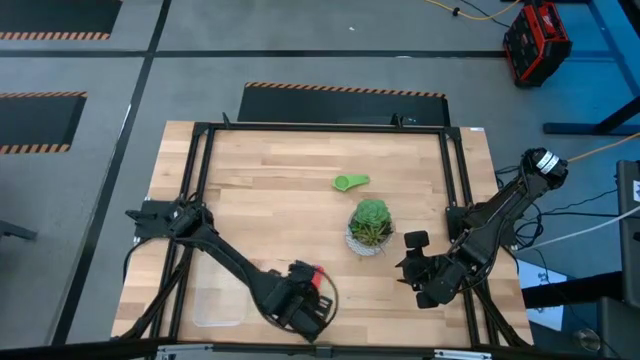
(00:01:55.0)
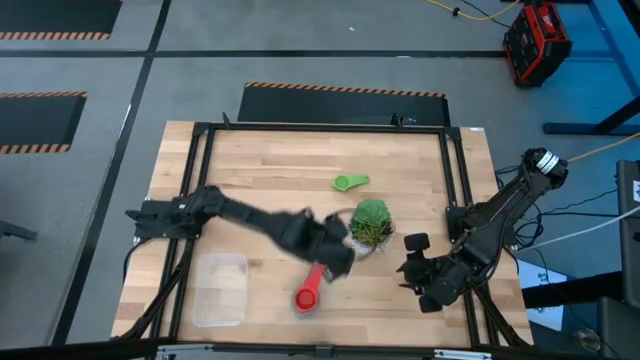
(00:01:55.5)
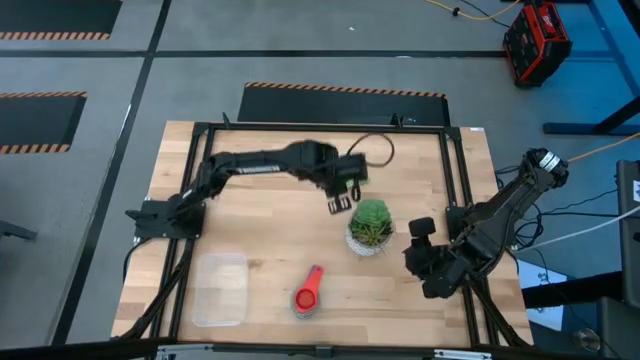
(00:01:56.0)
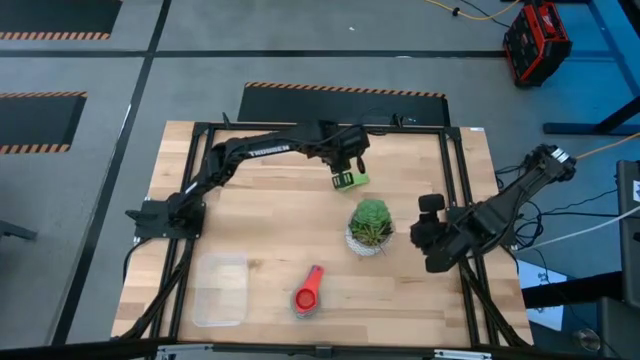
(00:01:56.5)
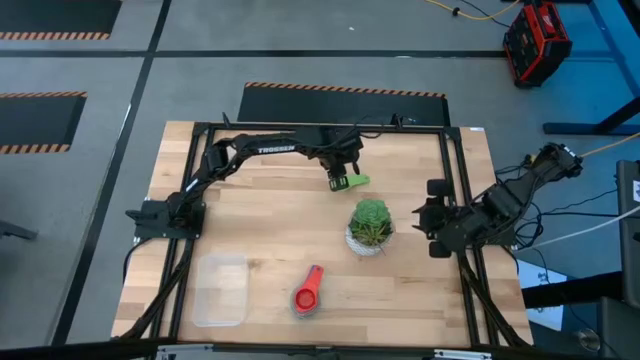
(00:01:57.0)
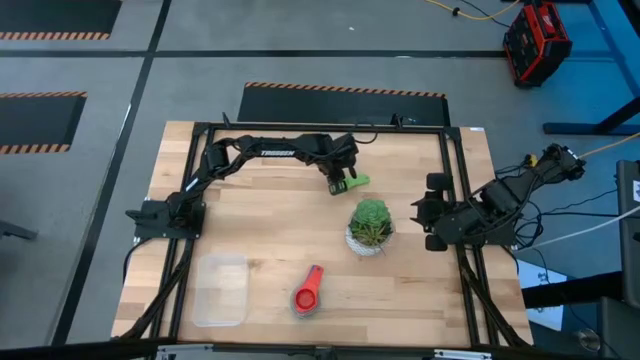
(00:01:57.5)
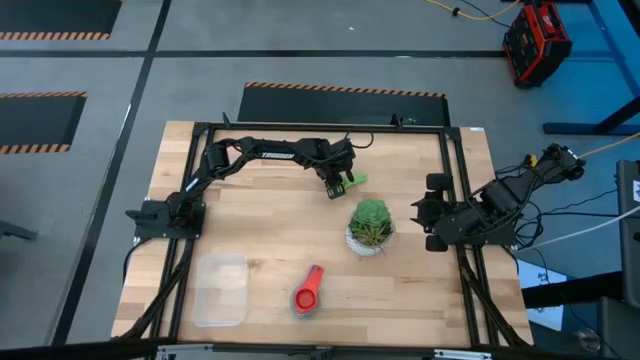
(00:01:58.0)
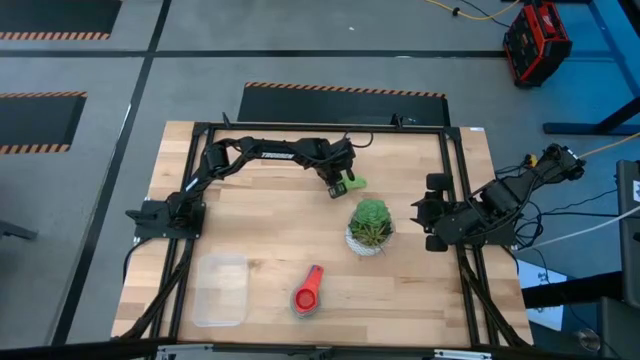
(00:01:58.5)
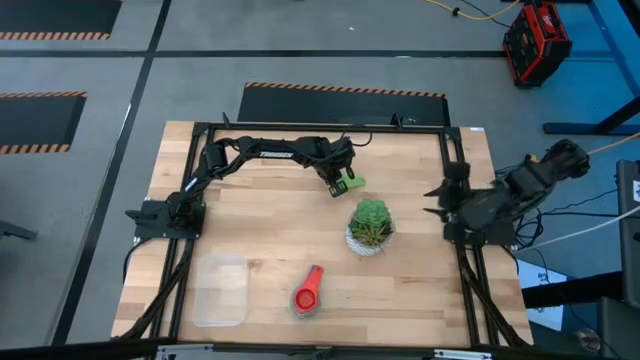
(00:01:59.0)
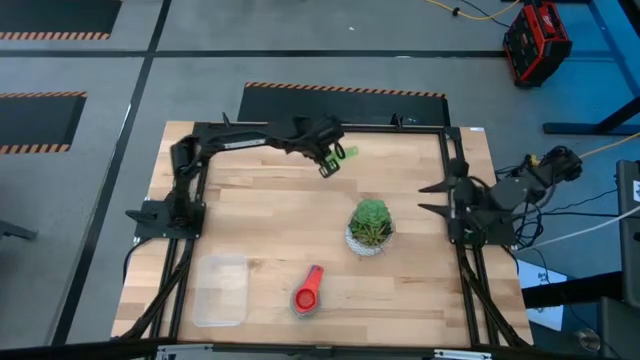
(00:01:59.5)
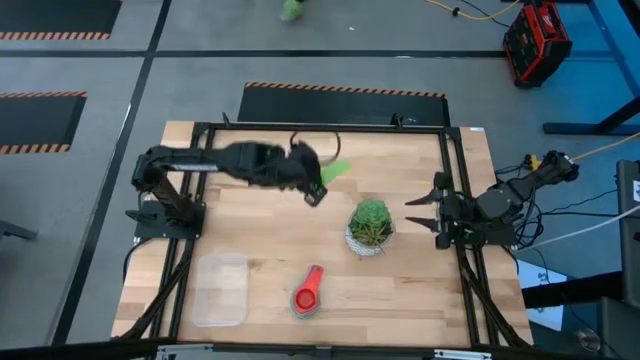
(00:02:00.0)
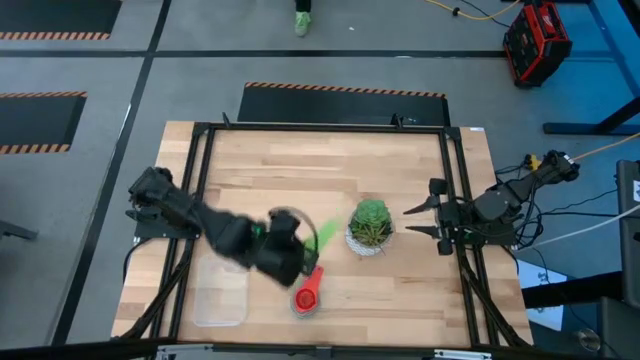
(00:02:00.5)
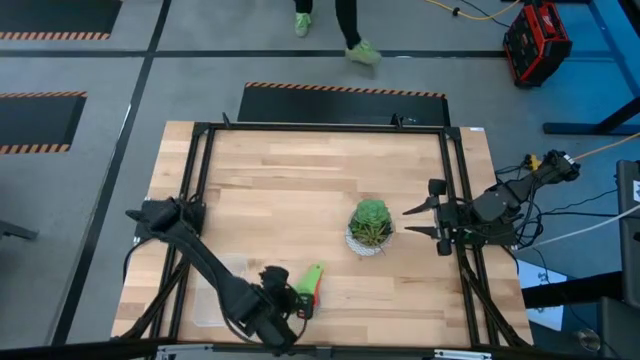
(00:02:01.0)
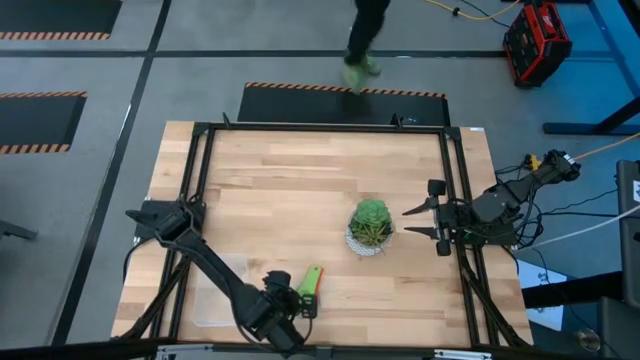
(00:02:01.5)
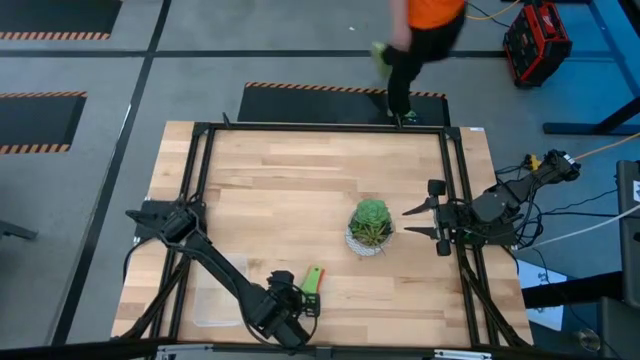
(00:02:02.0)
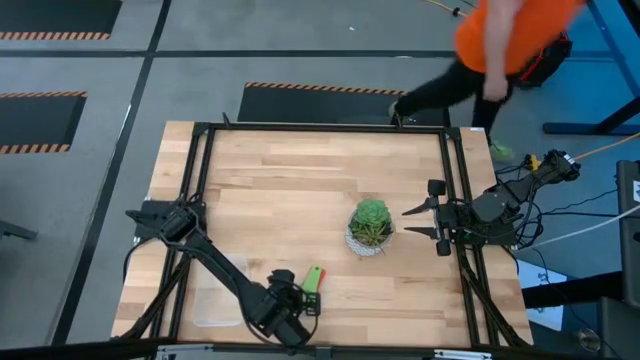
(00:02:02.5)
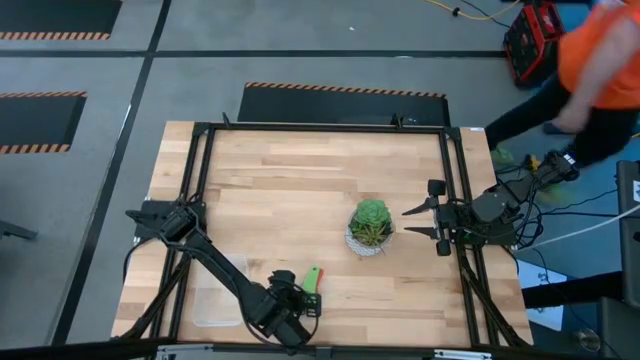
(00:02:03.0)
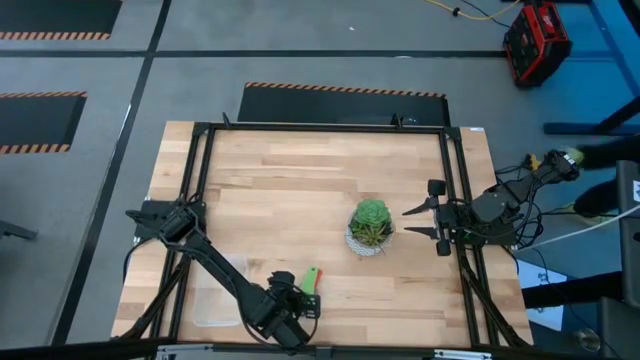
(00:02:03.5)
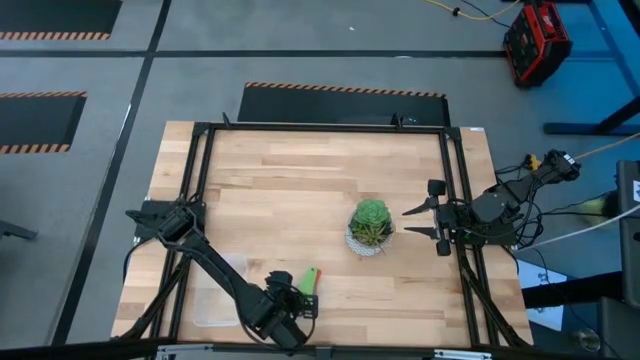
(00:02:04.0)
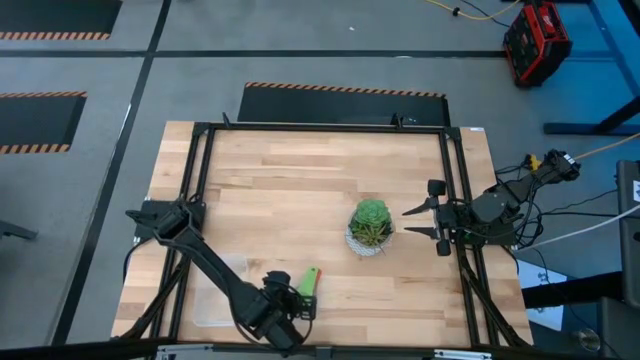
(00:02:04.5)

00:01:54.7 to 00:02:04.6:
Task: Nest measuring cups in basket
Stack the green measuring cup on top of the red measuring cup

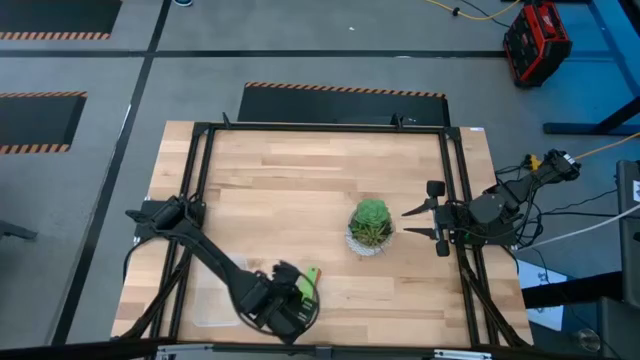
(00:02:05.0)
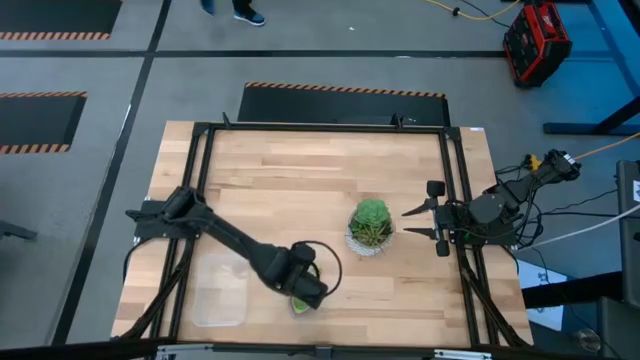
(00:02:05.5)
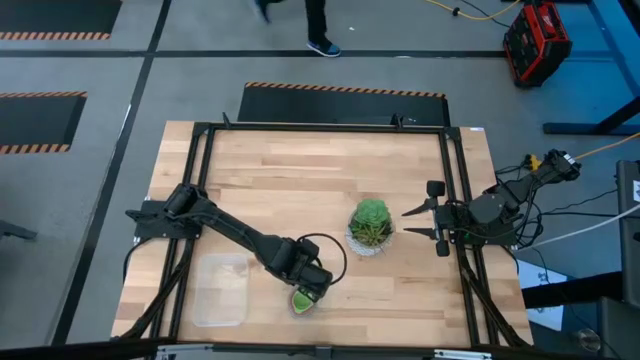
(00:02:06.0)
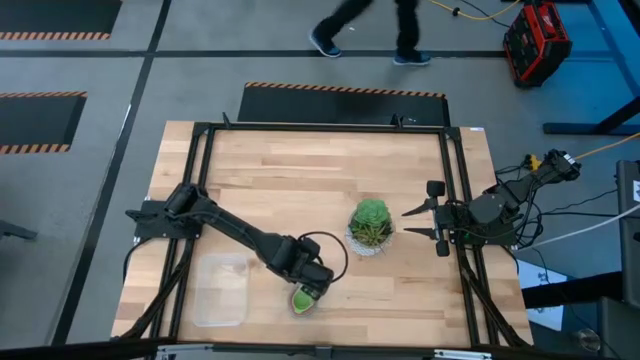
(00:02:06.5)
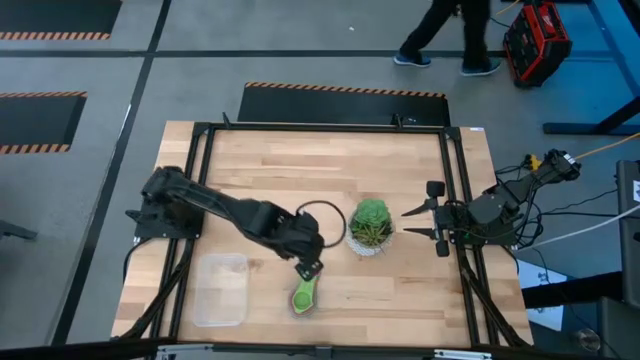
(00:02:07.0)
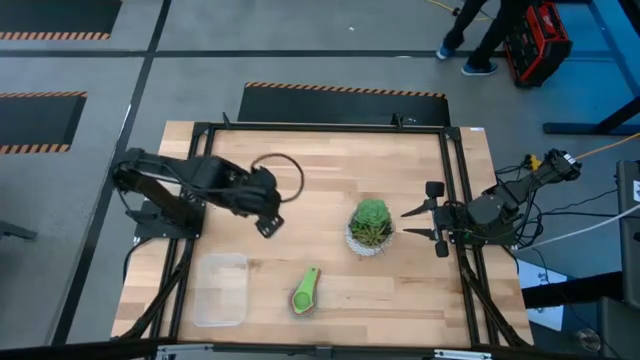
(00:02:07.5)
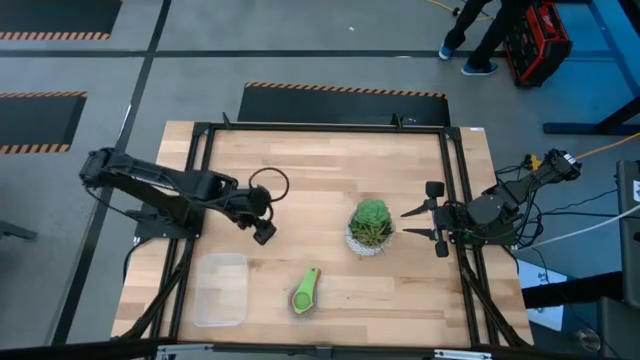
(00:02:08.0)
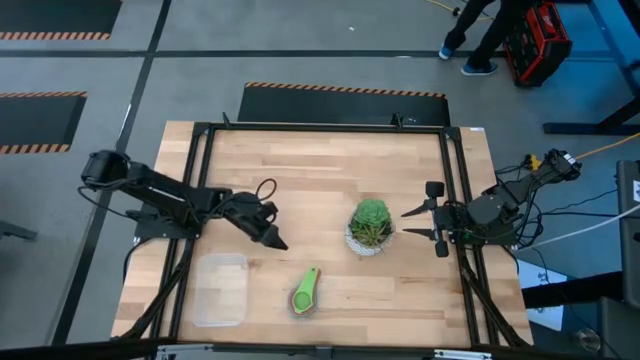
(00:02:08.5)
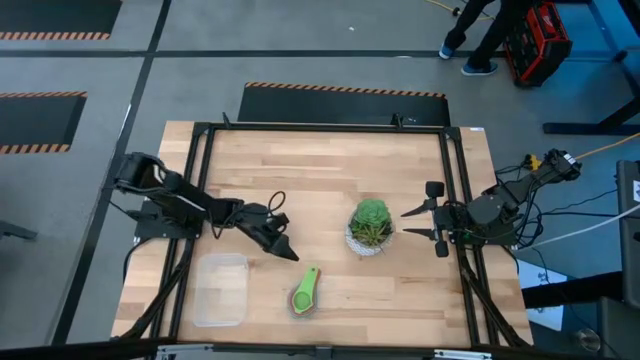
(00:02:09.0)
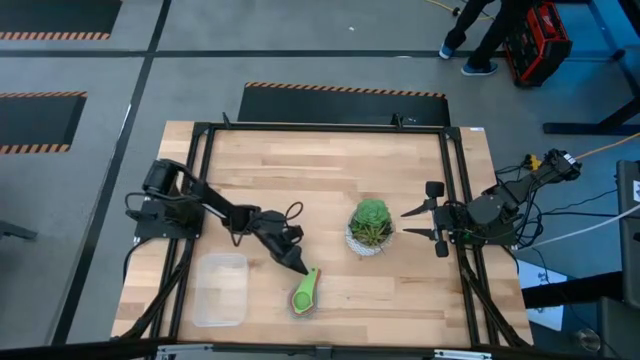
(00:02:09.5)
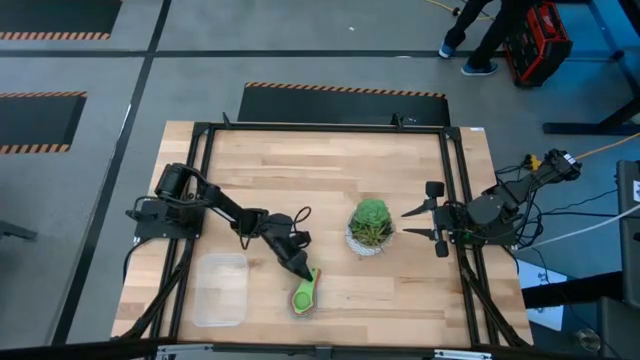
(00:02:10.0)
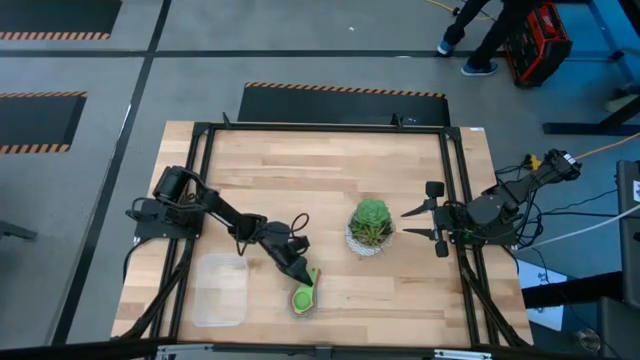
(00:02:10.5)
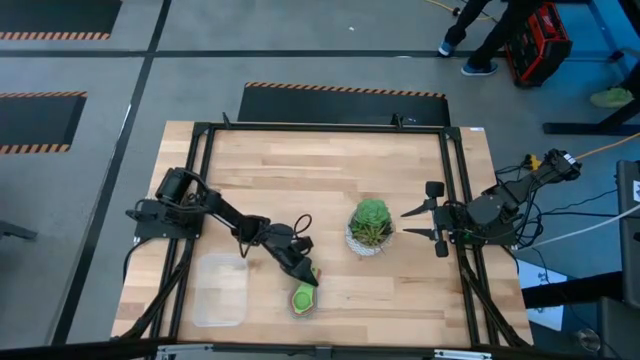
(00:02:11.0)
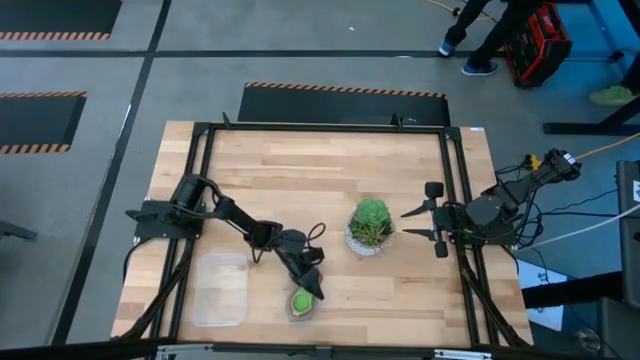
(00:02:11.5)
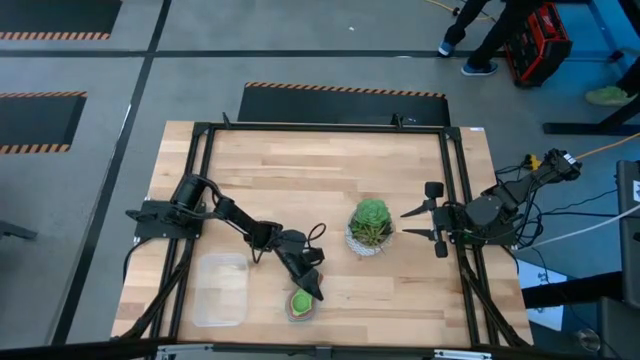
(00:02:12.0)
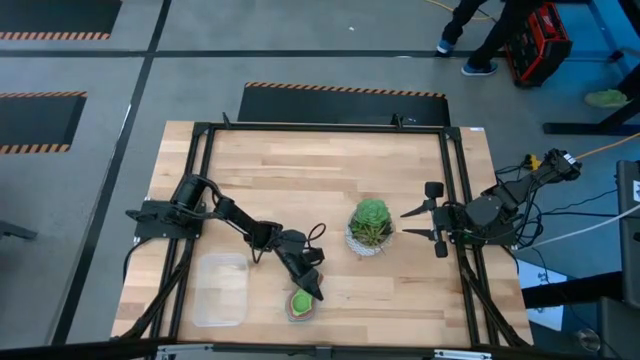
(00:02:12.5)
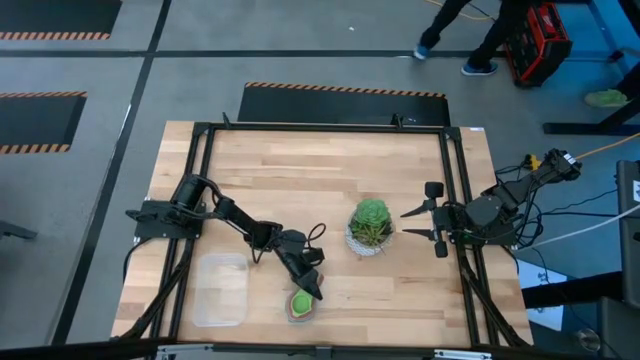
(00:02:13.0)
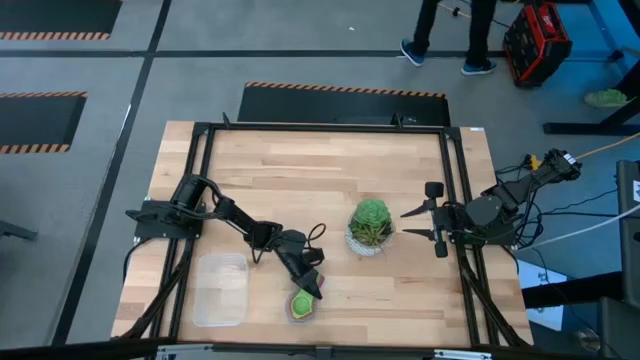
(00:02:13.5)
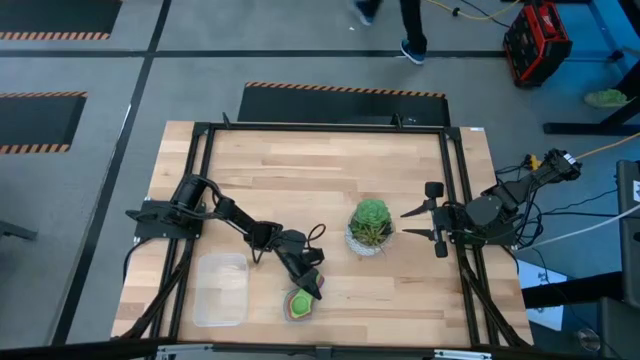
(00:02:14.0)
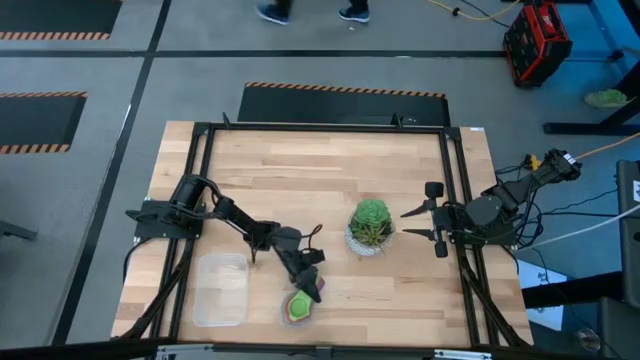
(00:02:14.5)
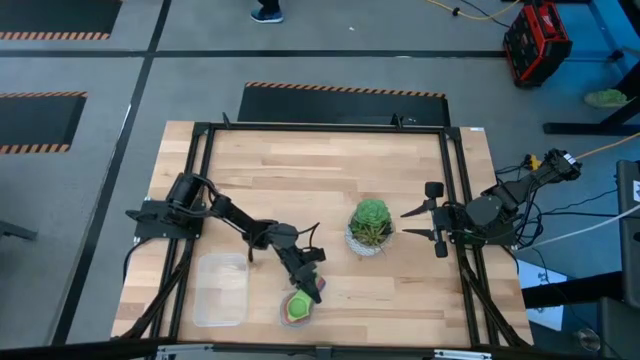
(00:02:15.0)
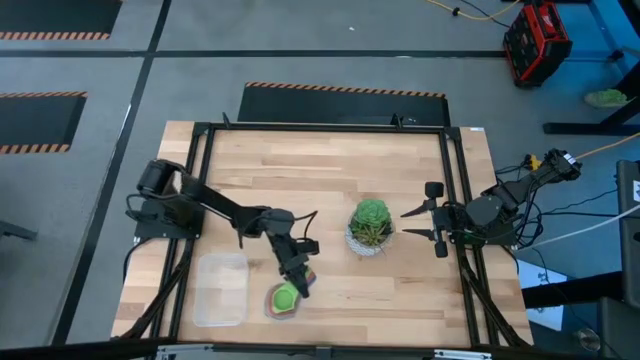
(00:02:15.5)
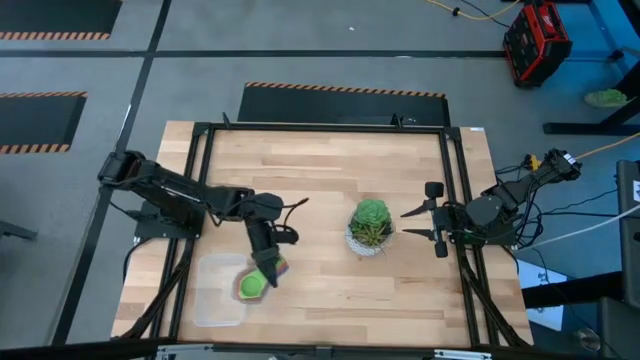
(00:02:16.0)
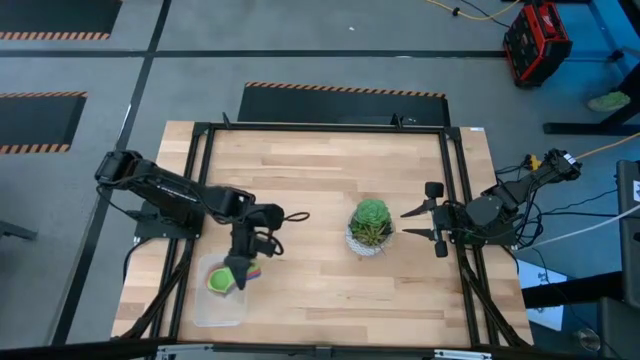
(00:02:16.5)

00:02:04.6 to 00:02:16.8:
Put the stacked measuring cup into the transparent bin
